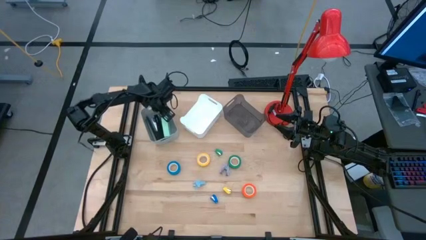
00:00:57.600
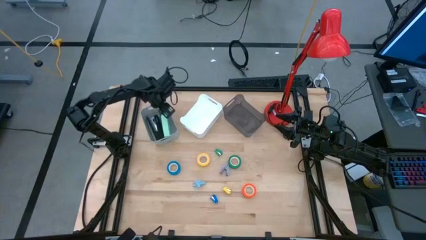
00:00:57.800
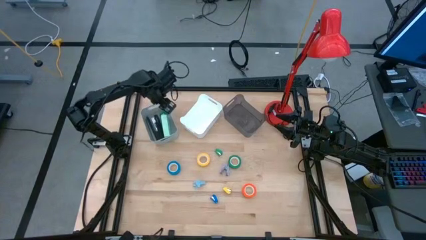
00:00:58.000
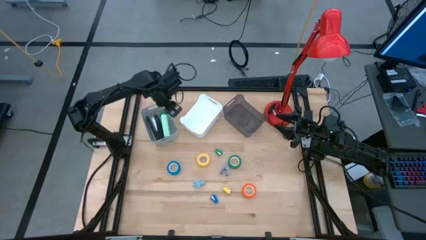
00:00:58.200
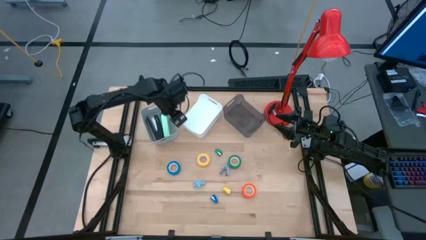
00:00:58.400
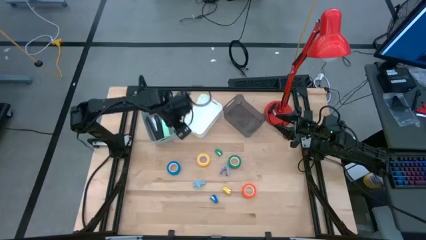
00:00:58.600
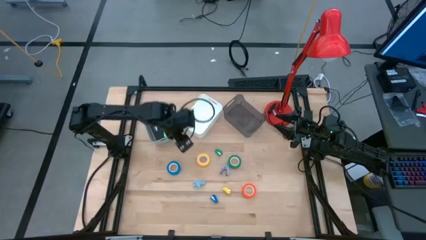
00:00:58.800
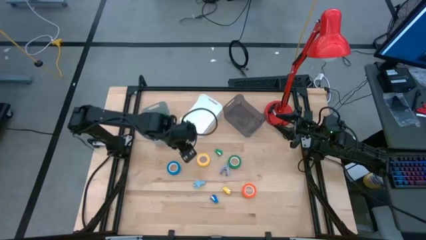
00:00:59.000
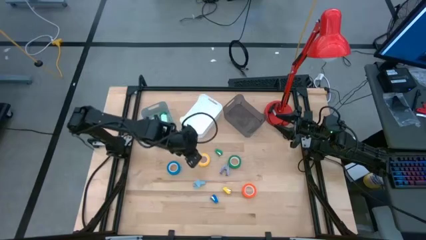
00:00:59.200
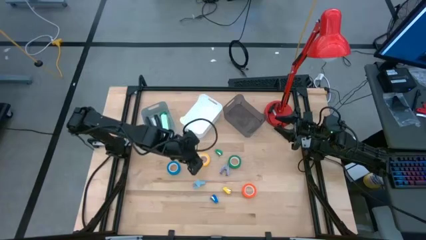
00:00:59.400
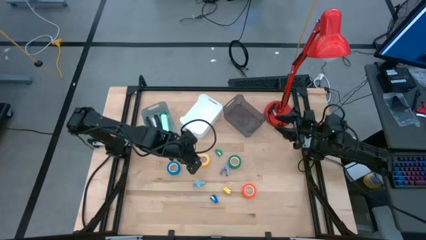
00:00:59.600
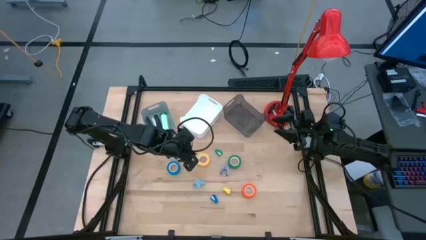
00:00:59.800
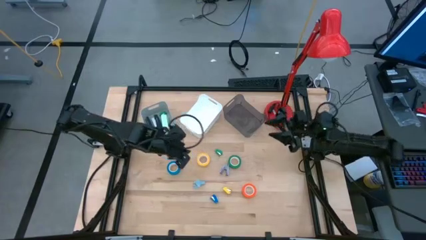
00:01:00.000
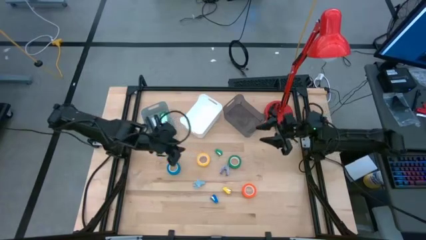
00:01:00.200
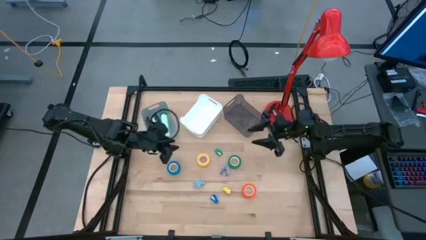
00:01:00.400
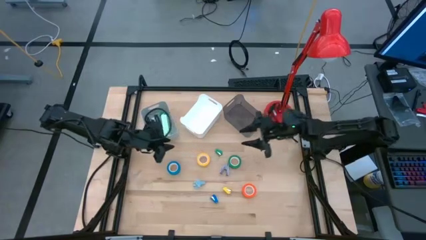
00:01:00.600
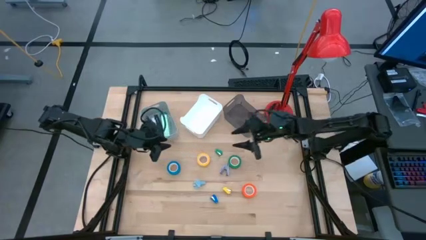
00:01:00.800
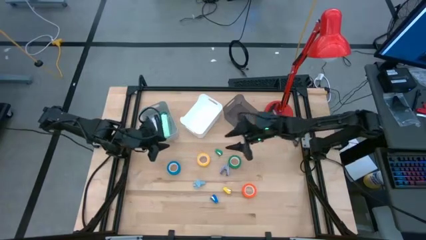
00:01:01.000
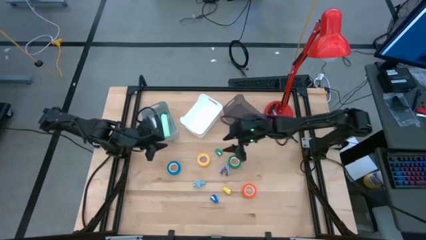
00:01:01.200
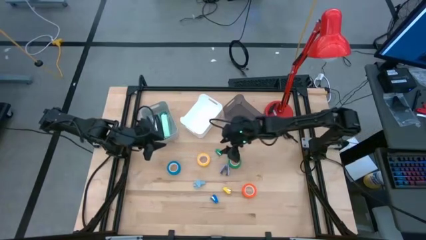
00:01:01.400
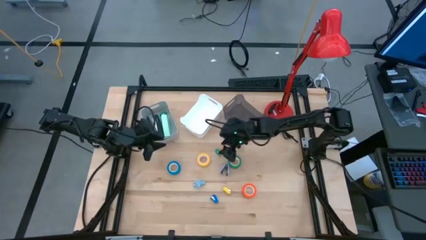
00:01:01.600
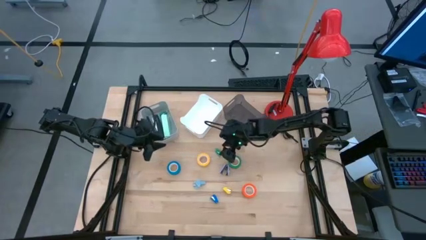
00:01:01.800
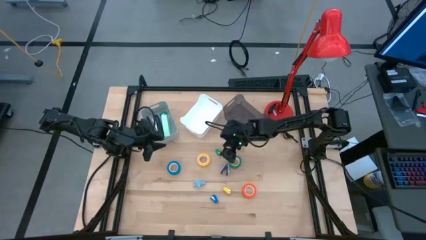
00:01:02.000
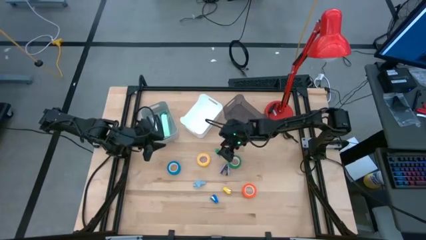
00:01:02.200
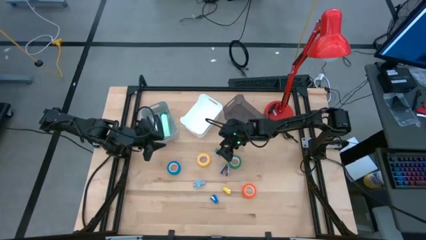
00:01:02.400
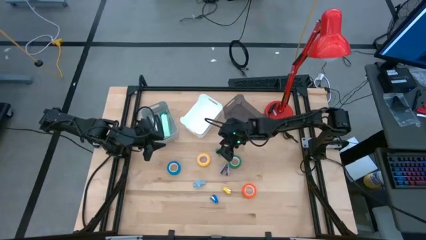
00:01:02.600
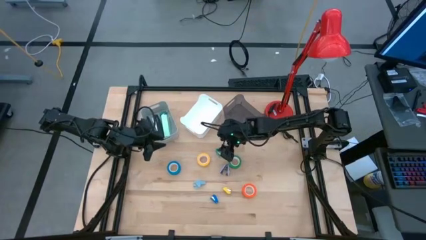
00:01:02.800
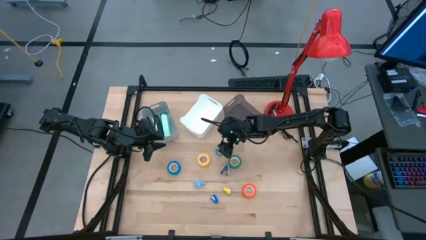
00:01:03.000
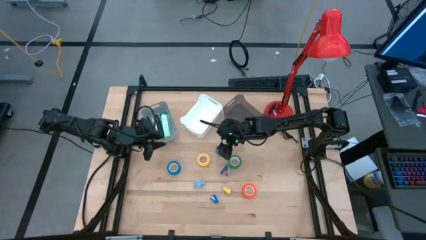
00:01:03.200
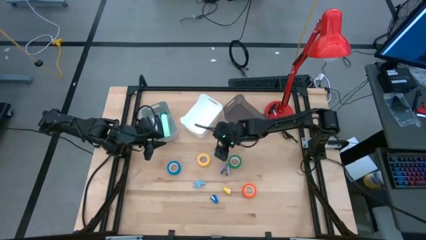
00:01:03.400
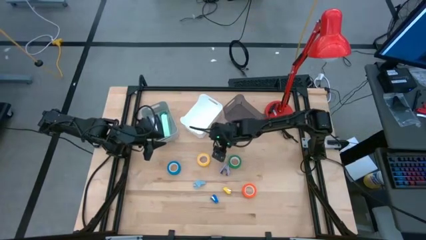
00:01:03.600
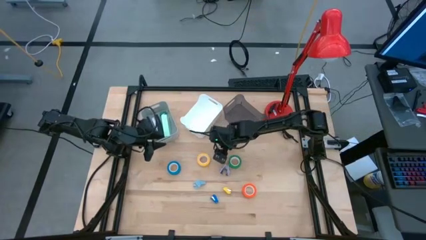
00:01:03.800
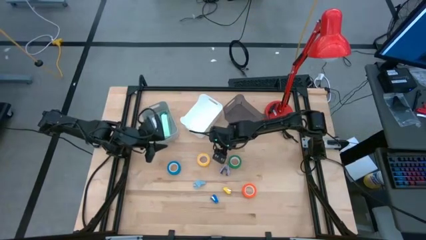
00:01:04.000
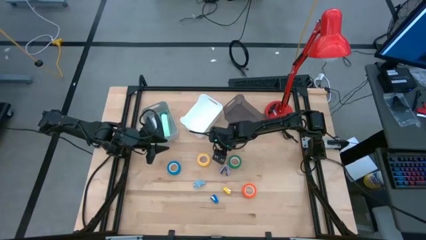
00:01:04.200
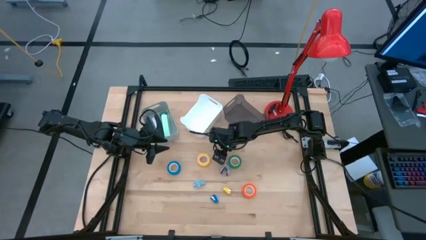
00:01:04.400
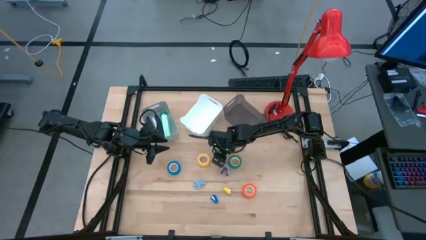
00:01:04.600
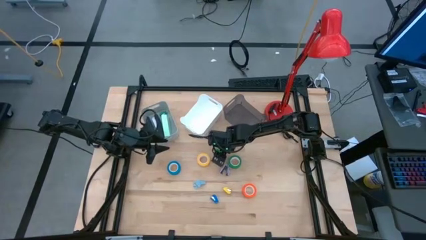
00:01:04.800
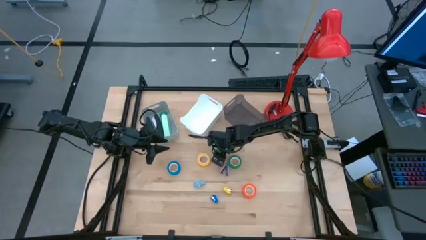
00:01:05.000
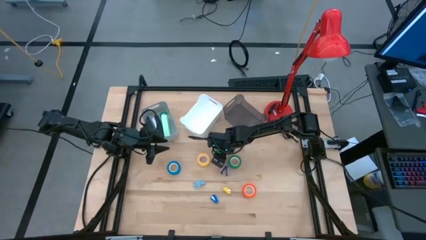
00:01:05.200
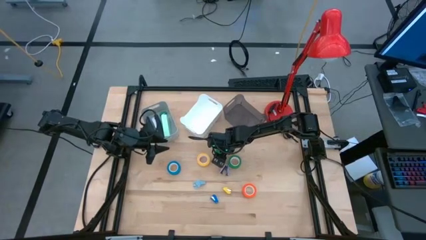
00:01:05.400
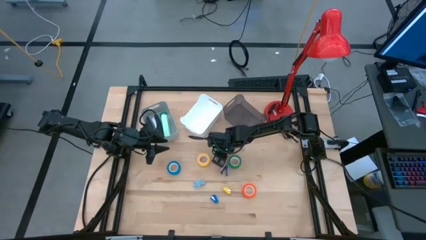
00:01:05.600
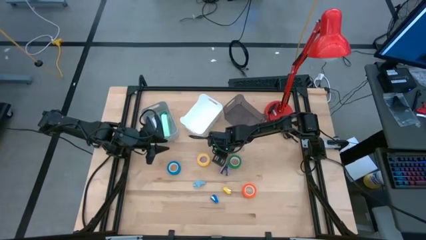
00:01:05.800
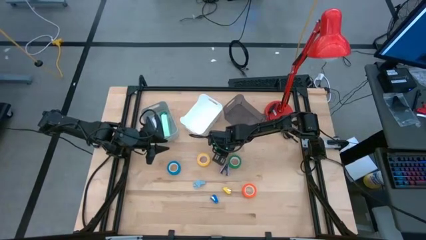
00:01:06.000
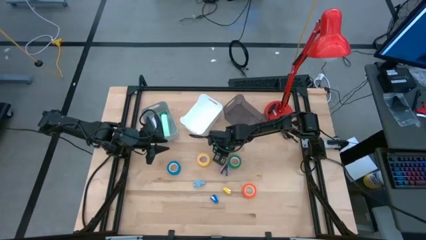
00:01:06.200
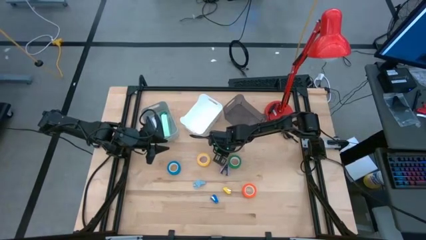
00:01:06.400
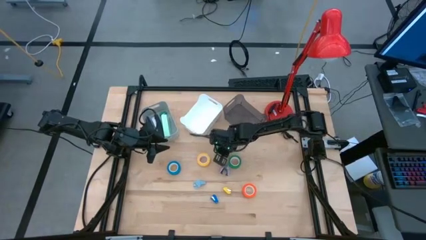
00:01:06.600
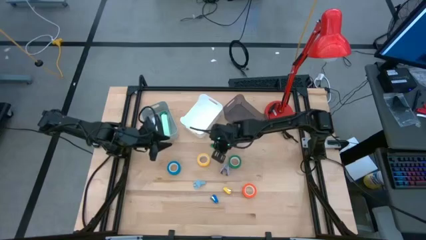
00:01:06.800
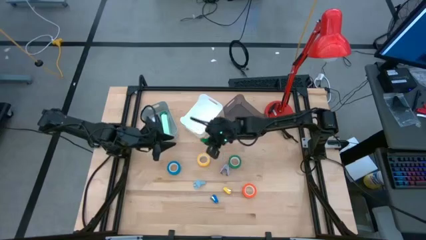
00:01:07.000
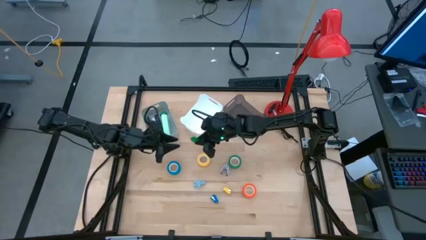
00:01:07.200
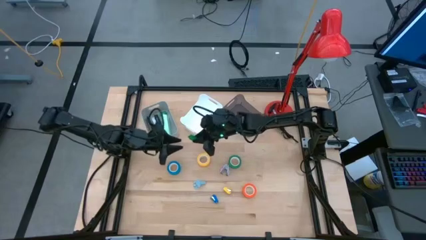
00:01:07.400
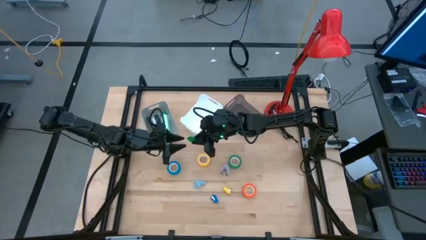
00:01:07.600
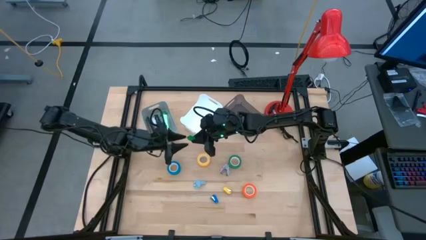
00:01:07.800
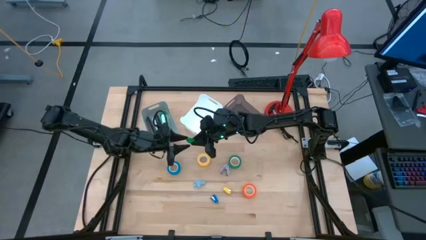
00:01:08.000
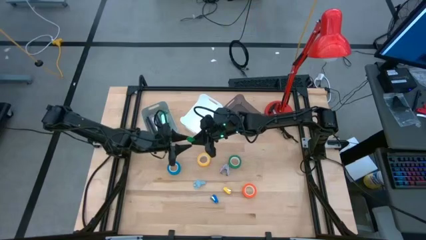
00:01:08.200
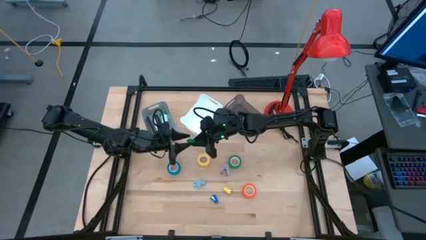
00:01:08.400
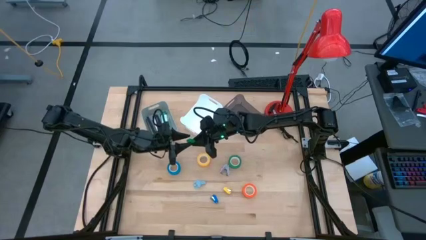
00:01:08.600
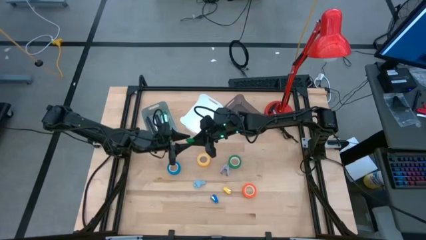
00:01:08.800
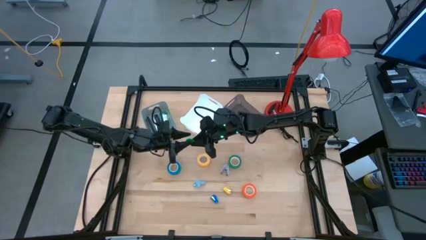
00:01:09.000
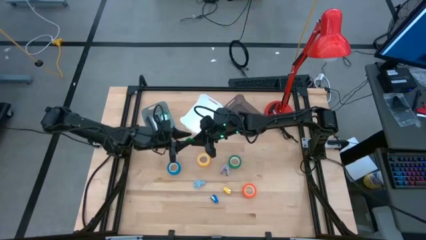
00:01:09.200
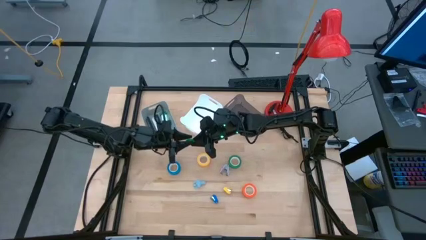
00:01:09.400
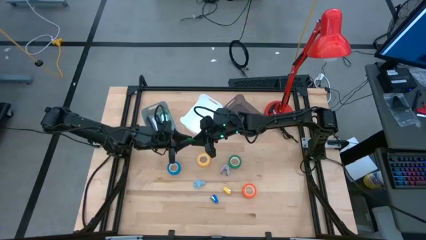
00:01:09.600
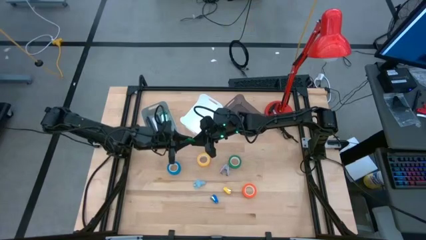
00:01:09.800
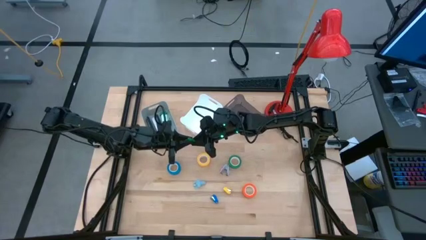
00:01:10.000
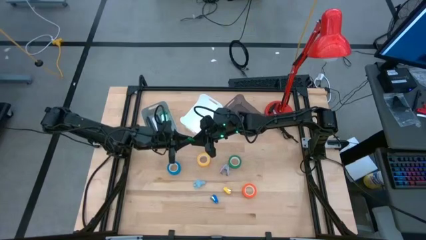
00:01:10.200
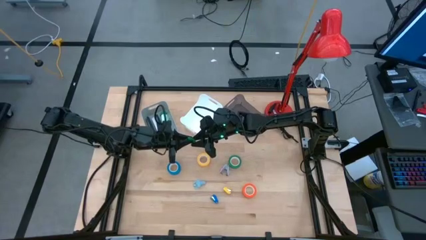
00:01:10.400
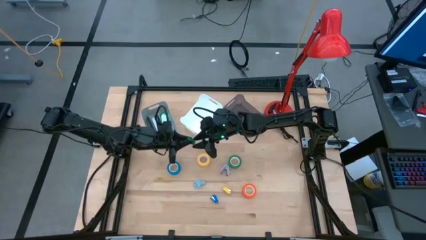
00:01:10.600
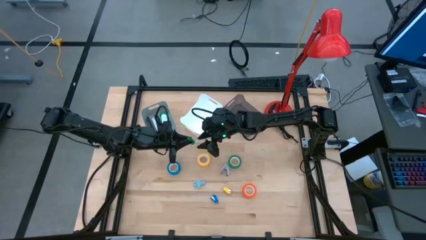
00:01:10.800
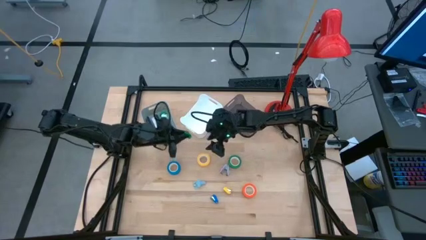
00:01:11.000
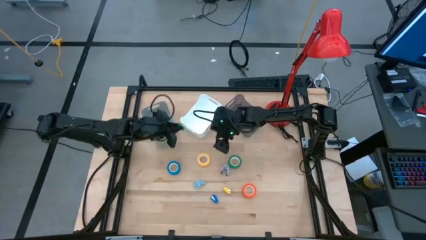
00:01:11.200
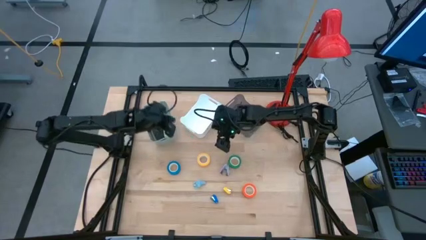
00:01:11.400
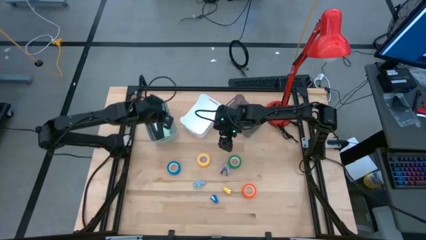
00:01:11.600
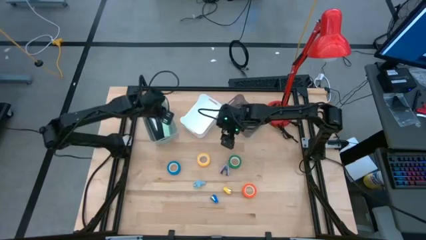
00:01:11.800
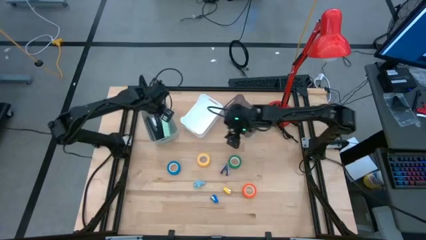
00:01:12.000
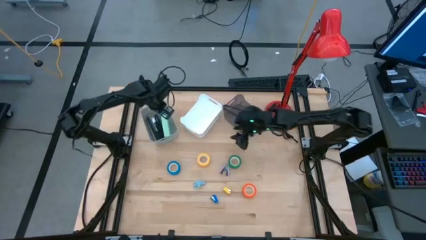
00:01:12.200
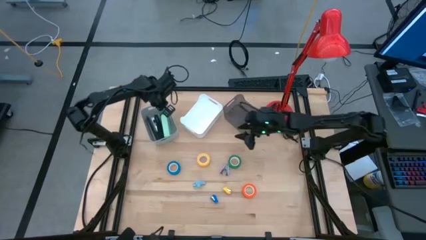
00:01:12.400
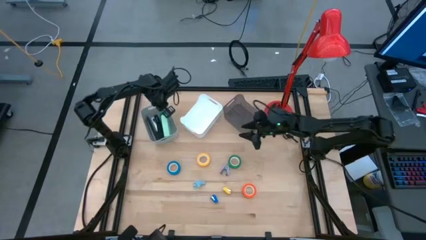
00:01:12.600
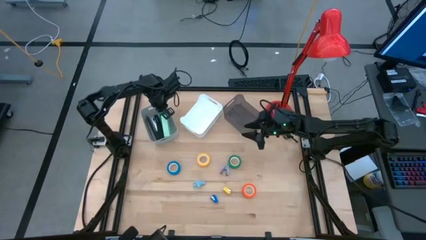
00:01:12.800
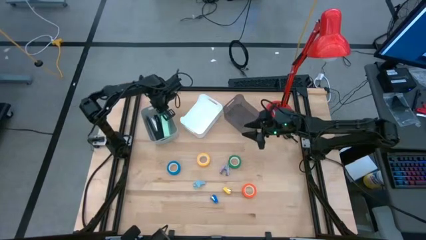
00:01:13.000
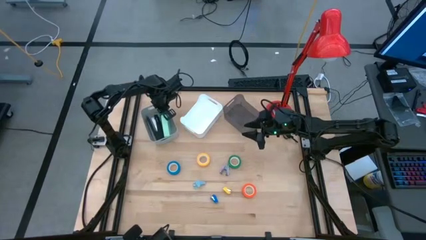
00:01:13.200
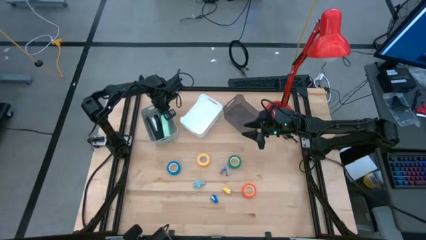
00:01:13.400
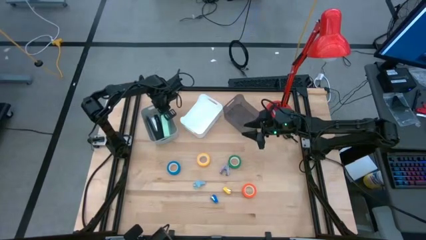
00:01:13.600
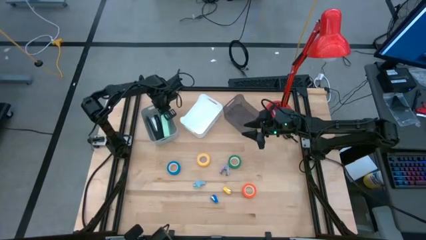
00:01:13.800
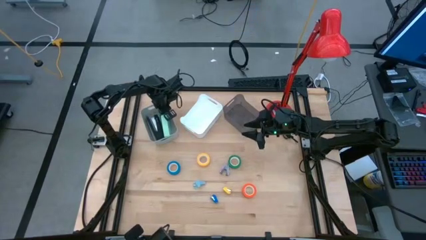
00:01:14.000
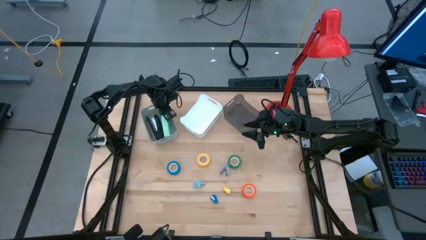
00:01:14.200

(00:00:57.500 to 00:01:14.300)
Task: Pick and place Stapler, Stapler remover, tape
Put the small green stapler into the gray bin
